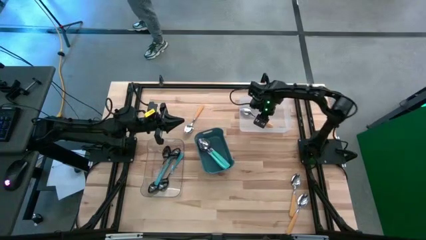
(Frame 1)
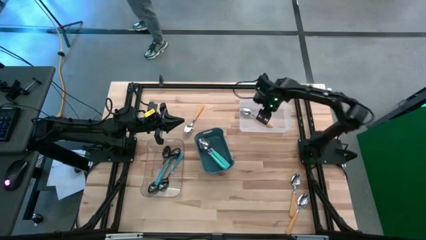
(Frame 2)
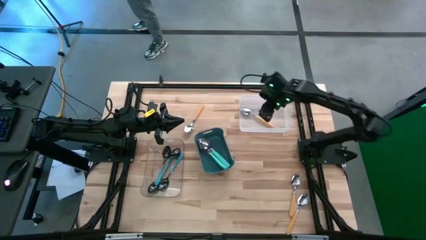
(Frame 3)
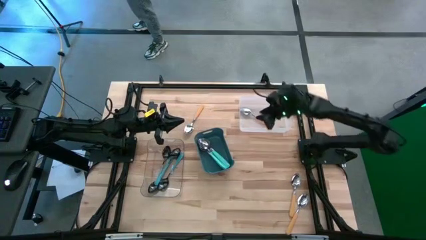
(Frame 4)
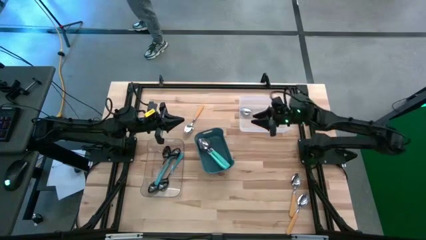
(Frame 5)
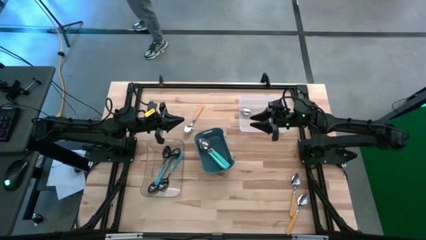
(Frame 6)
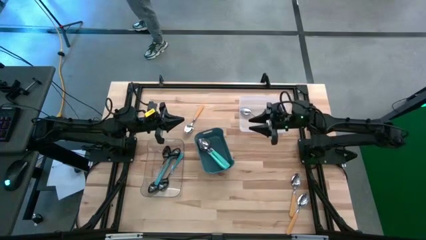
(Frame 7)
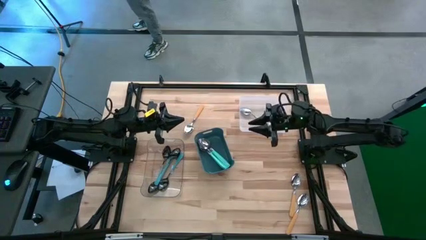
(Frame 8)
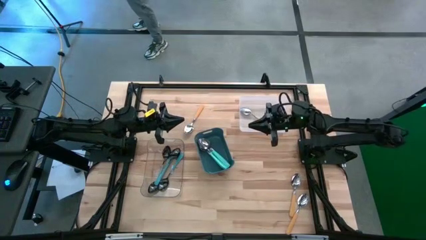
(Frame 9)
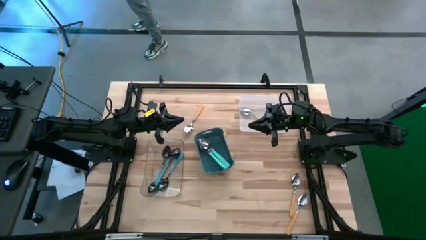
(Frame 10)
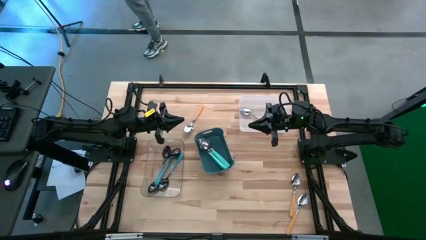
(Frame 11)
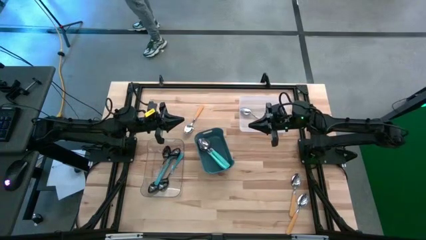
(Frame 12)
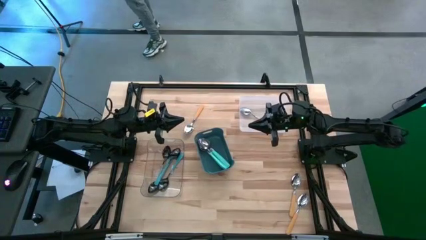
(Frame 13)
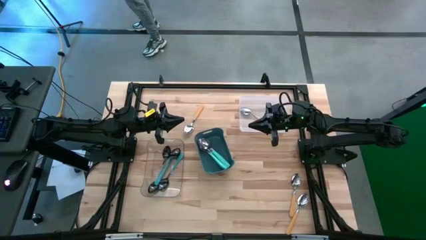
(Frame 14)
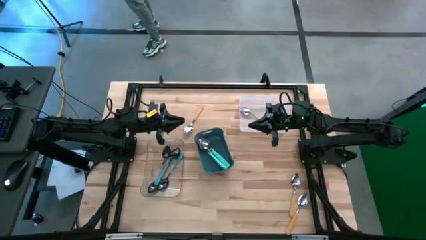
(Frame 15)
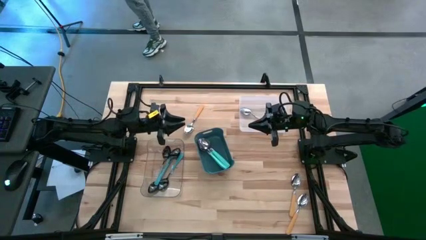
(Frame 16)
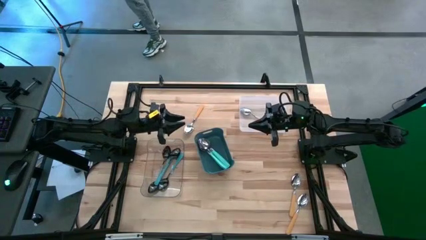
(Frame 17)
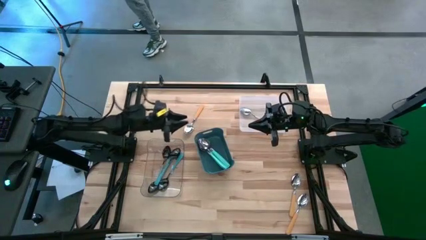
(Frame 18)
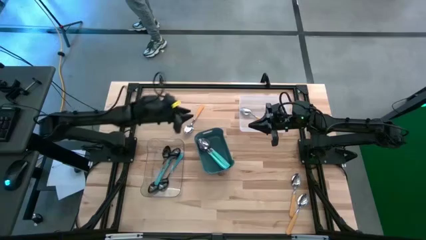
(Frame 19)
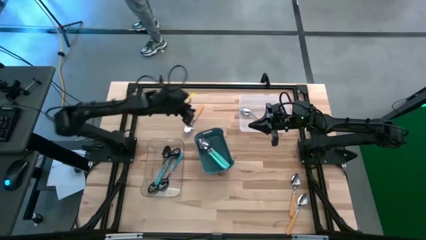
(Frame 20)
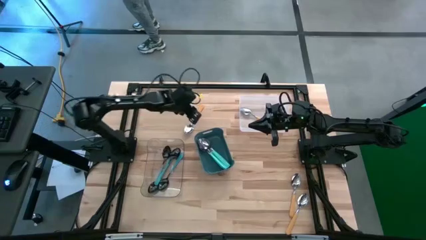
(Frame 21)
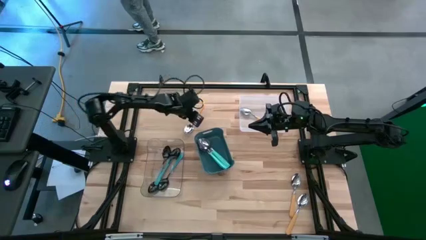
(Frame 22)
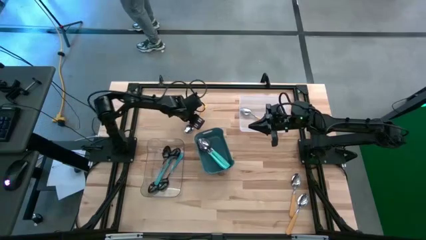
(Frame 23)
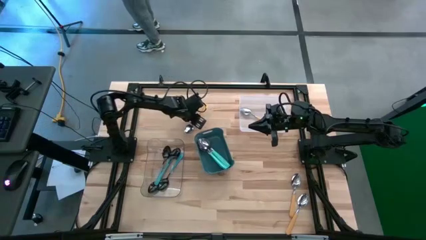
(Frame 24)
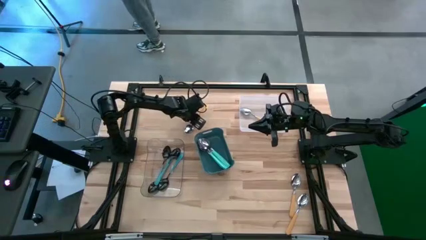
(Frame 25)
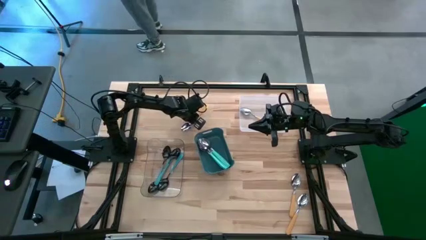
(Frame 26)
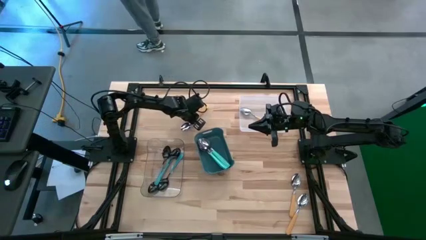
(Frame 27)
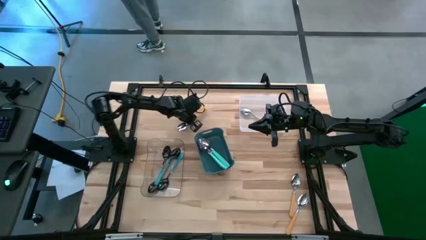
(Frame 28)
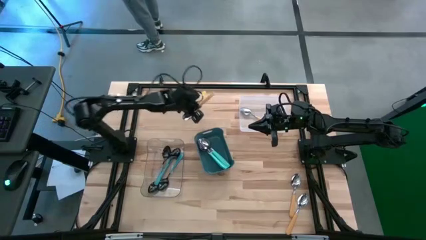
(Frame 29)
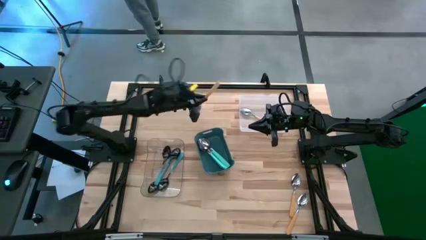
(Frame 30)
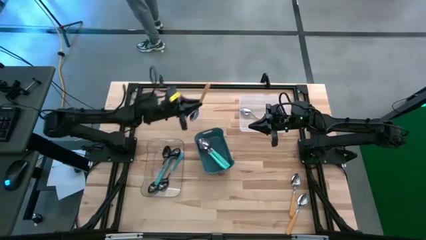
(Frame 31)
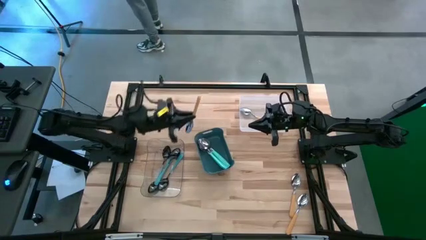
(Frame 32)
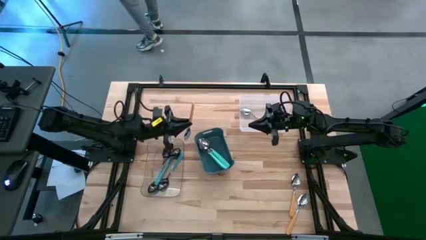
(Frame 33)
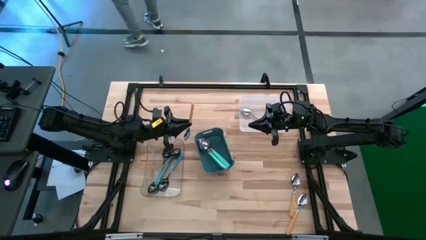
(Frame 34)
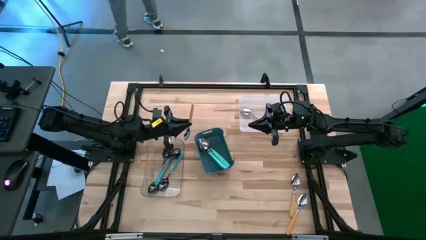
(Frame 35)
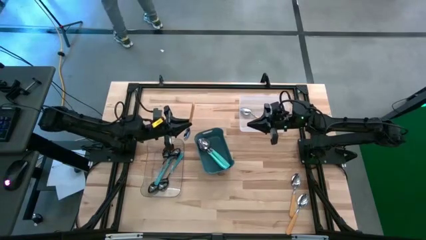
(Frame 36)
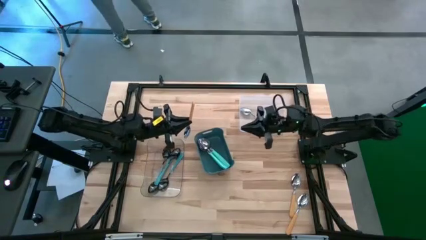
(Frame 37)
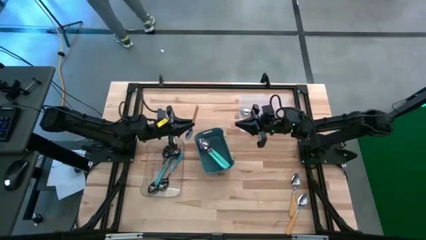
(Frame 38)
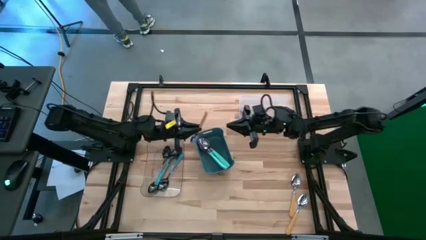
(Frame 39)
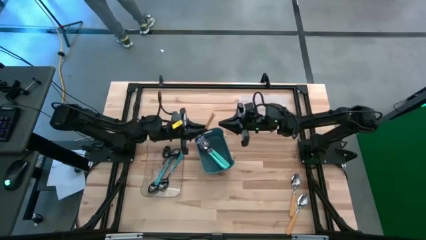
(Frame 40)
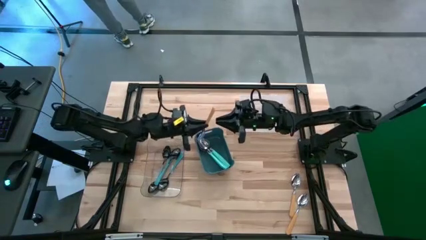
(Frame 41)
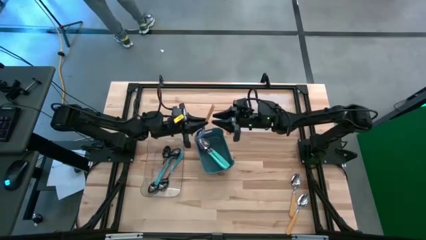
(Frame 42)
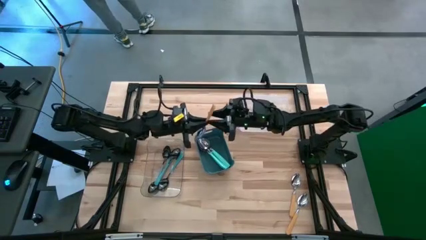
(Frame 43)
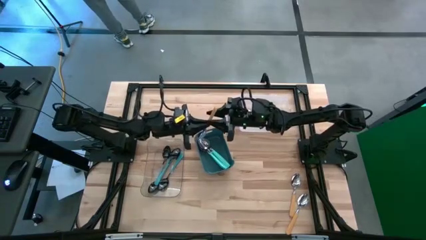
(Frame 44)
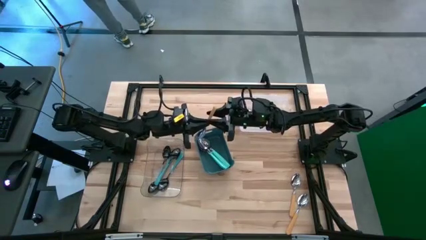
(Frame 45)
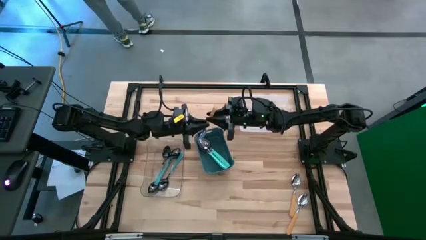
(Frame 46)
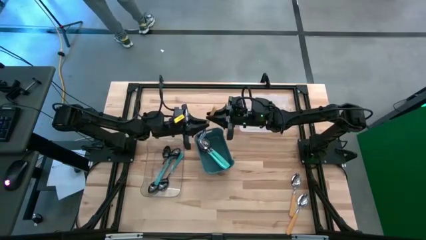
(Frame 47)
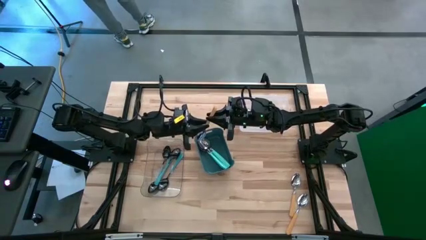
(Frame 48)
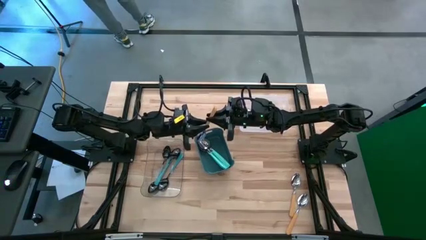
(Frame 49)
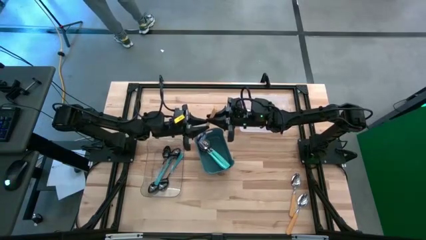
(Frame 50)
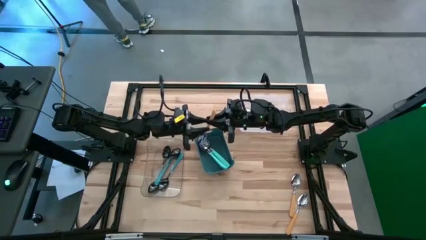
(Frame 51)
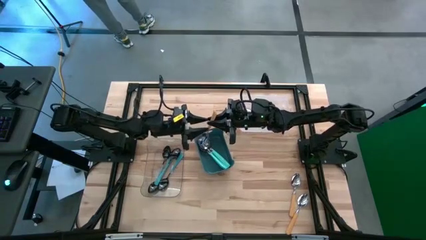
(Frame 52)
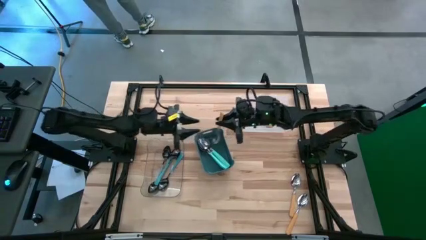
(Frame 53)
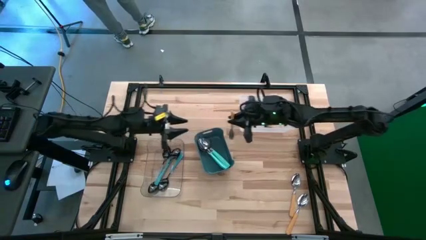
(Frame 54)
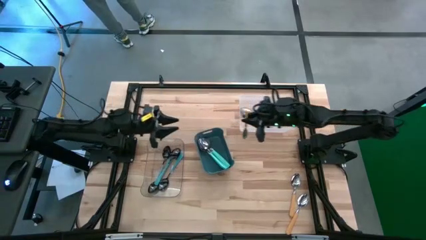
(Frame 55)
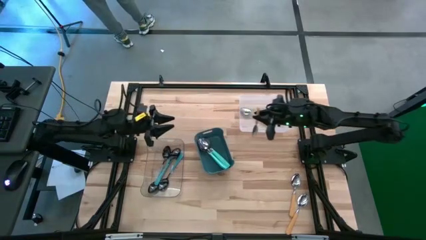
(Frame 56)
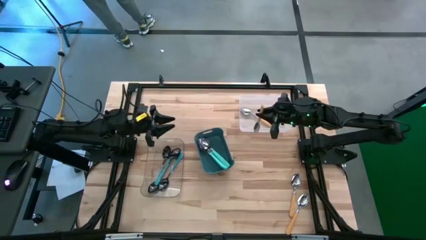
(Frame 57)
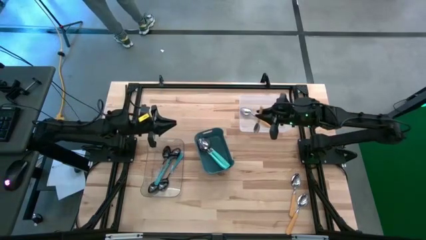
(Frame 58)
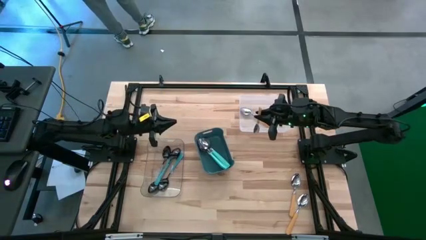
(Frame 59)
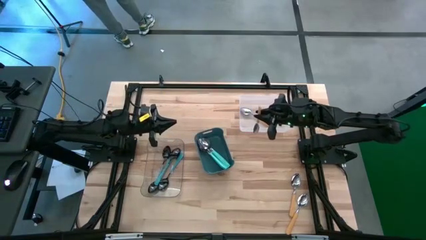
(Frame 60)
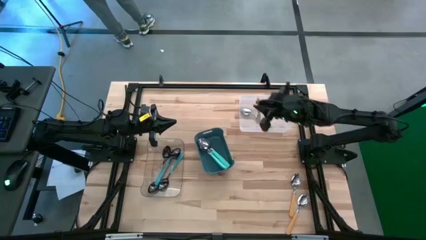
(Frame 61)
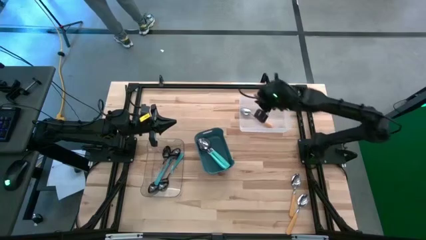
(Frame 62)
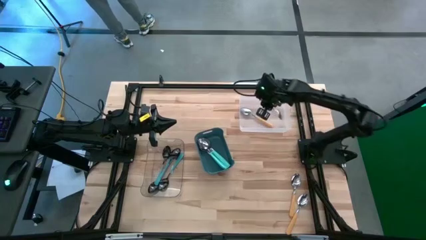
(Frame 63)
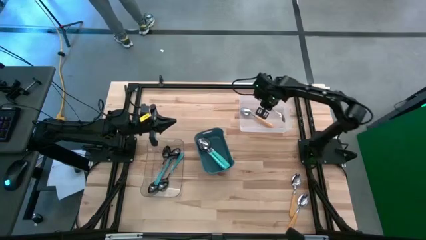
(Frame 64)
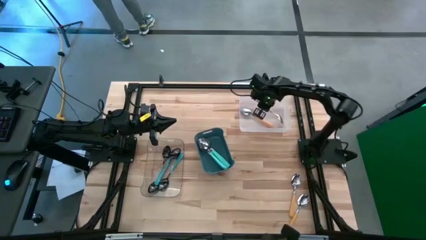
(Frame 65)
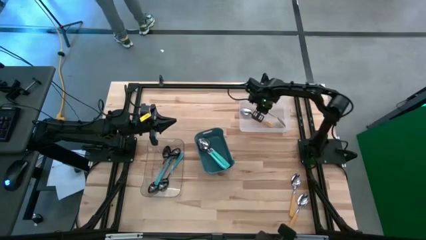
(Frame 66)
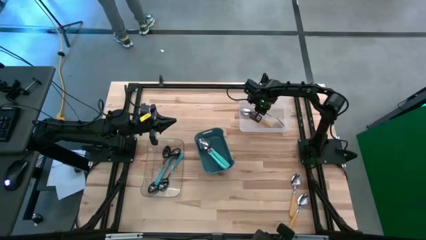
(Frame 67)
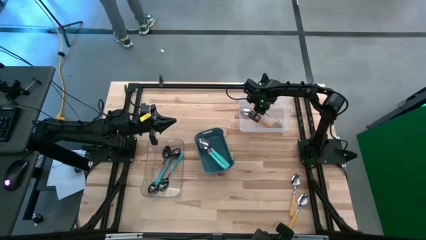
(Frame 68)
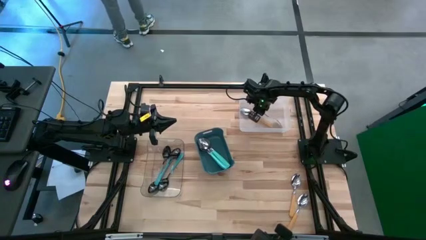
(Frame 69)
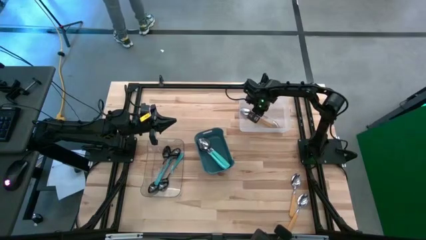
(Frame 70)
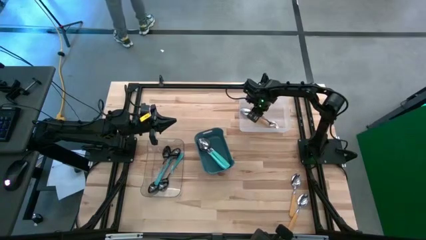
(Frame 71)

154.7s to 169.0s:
Task: Sort silverware by color (type)
Put the orange spoon into the white bin

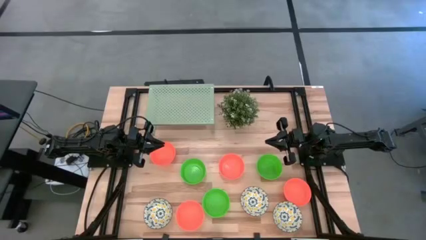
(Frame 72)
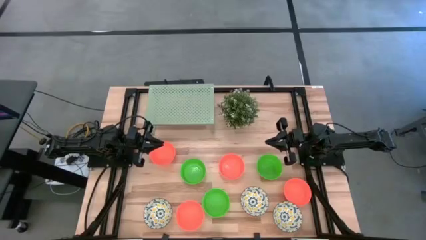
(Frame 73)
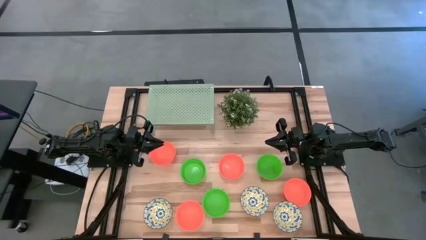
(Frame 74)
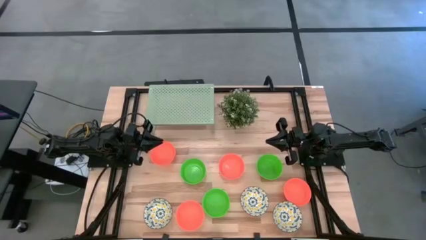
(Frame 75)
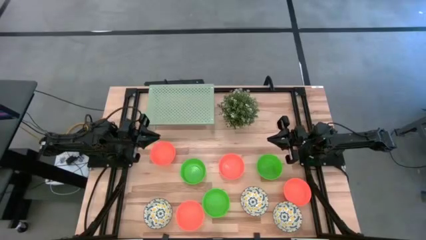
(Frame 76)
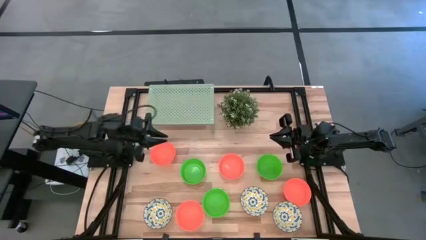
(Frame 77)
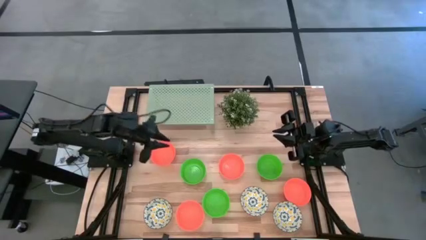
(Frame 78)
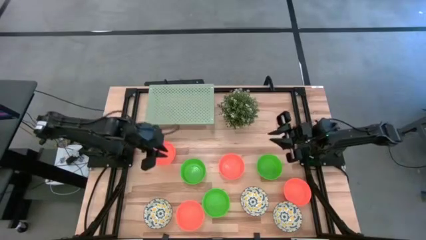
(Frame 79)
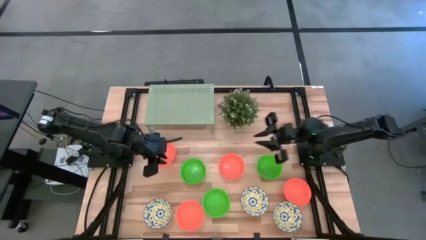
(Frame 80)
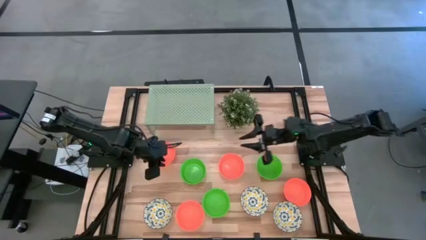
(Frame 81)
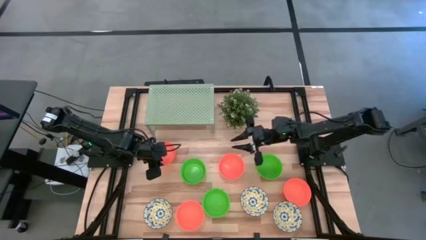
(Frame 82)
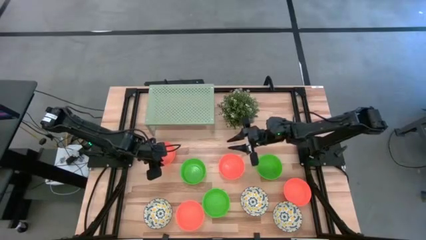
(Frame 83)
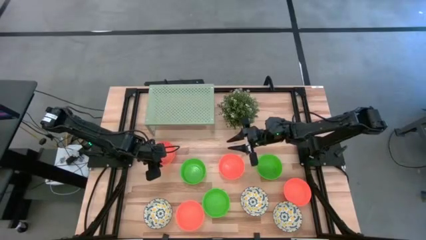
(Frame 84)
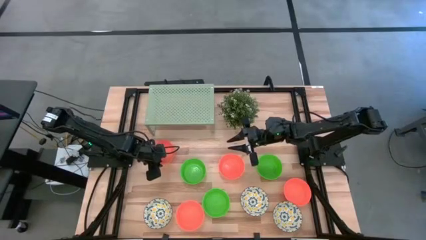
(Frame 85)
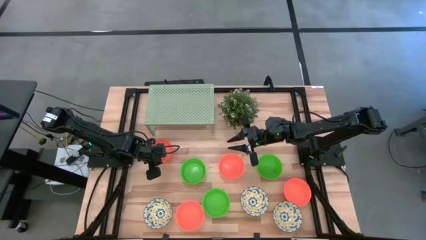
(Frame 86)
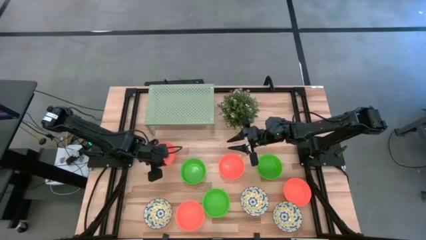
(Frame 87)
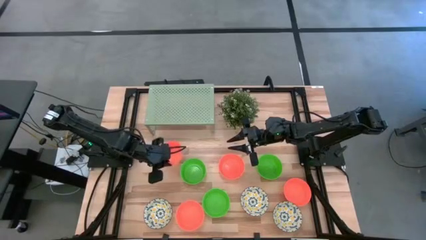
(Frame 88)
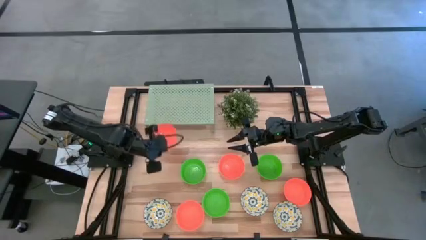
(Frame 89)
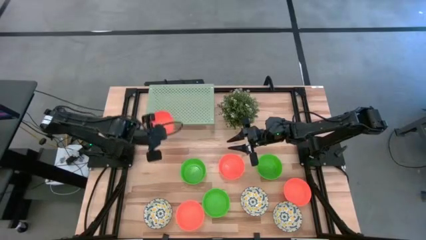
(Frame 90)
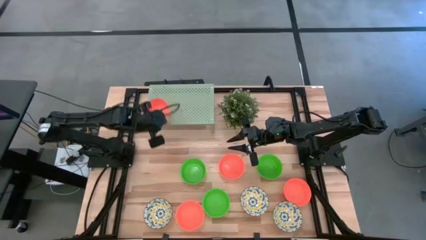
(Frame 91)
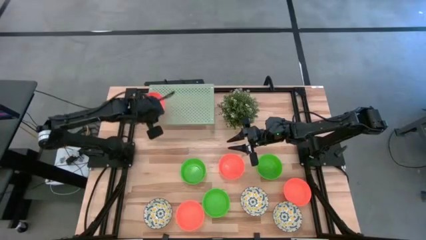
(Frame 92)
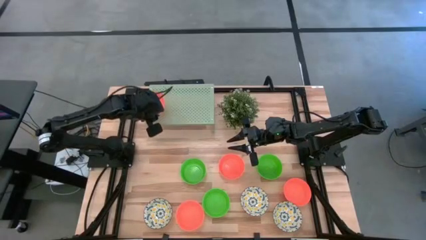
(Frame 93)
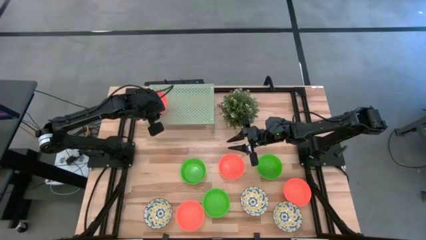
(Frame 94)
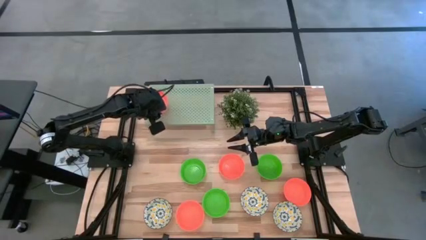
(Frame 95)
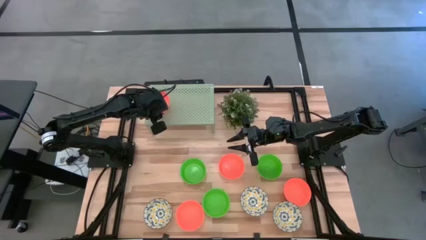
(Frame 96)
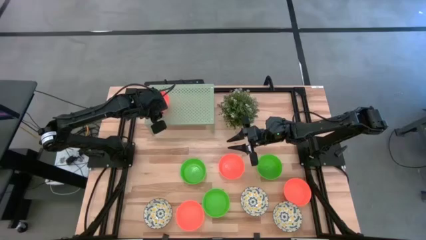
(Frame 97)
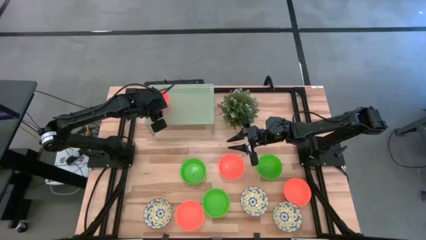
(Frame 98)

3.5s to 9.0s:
Task: Pick & Place Mini bowls
Put the orange bowl on the shelf
